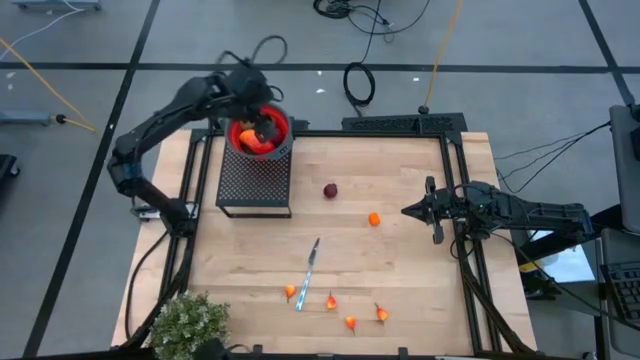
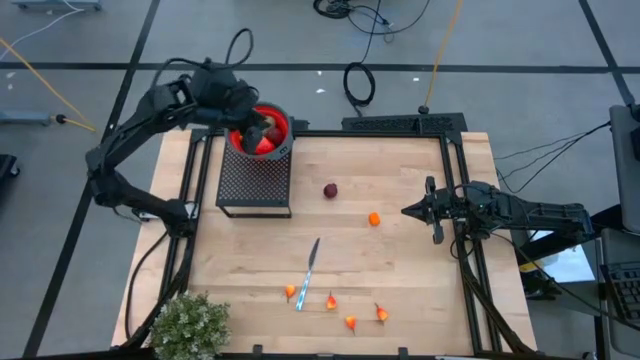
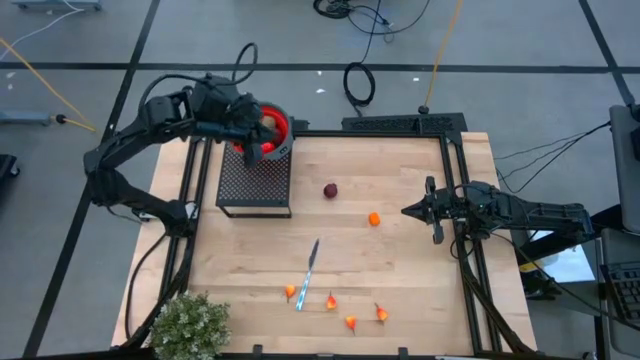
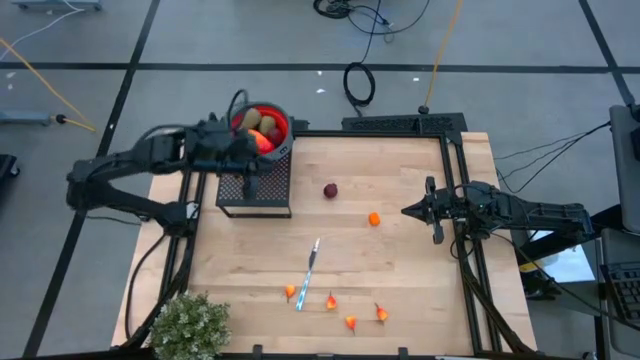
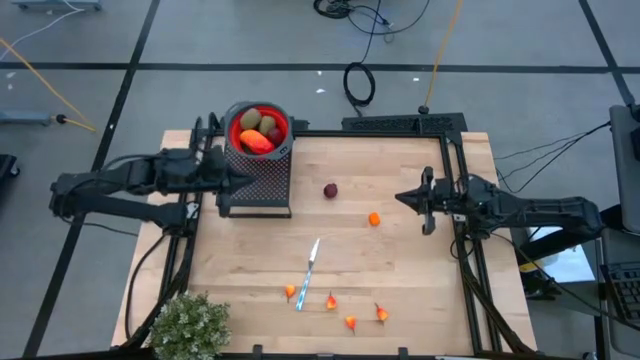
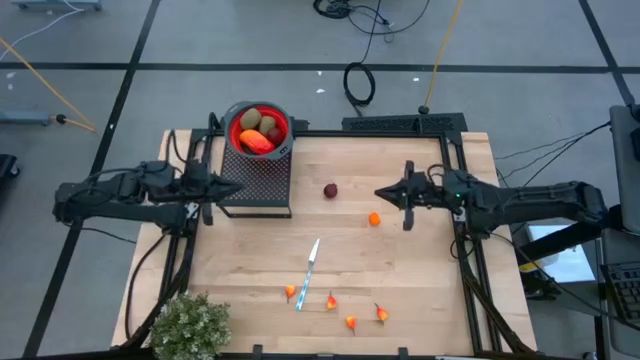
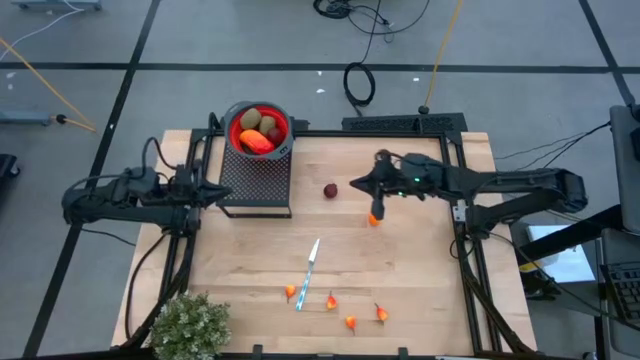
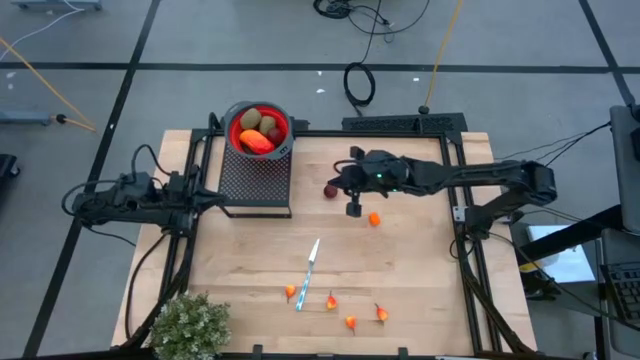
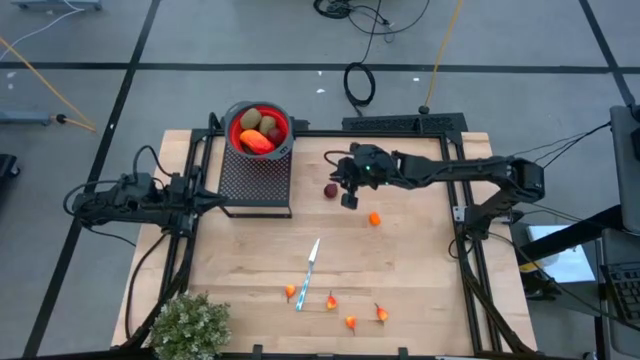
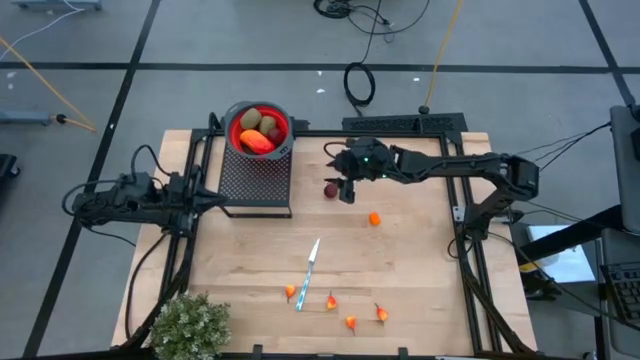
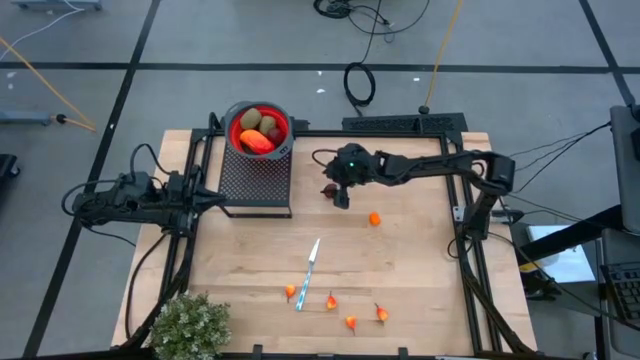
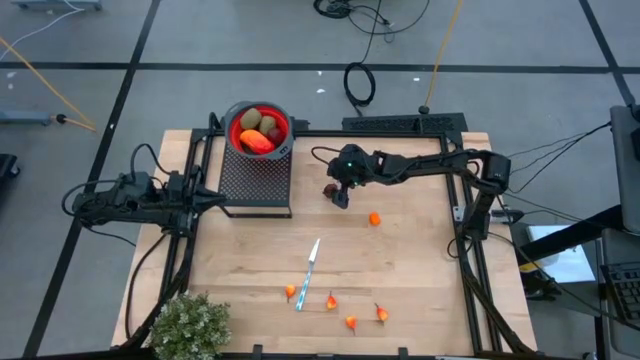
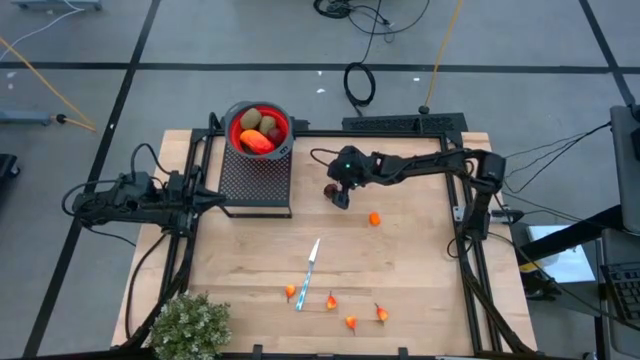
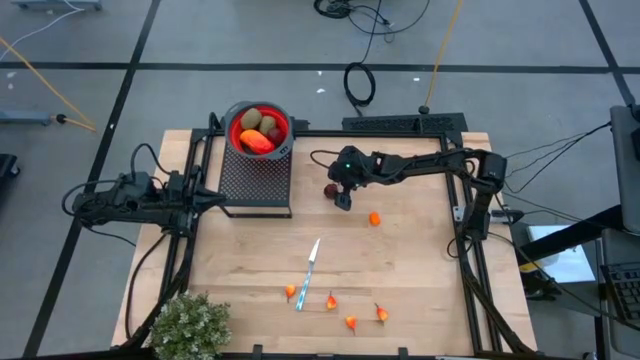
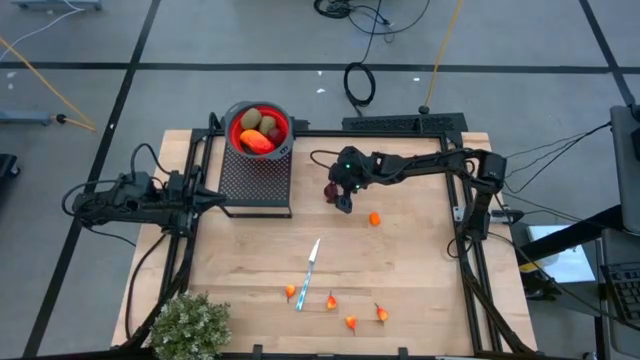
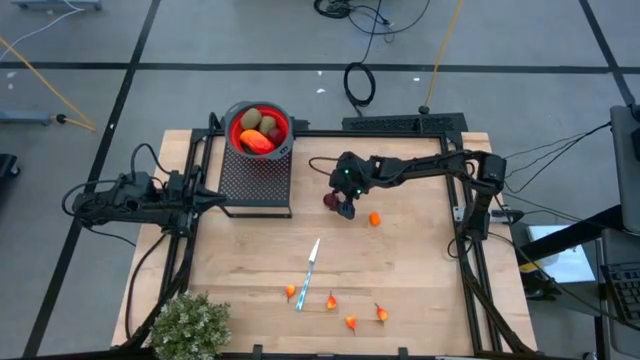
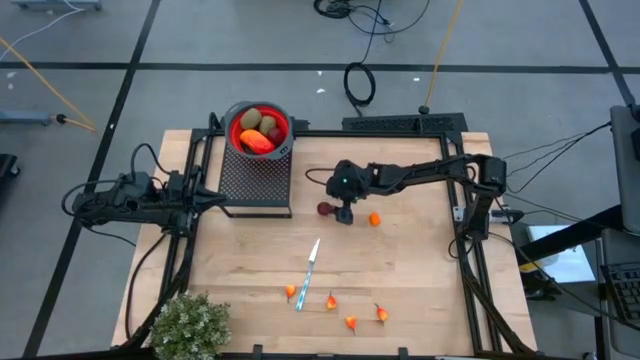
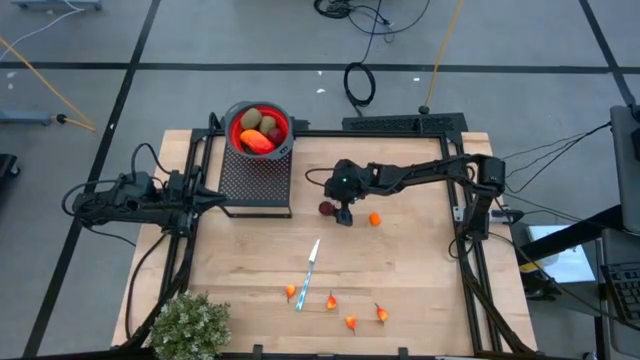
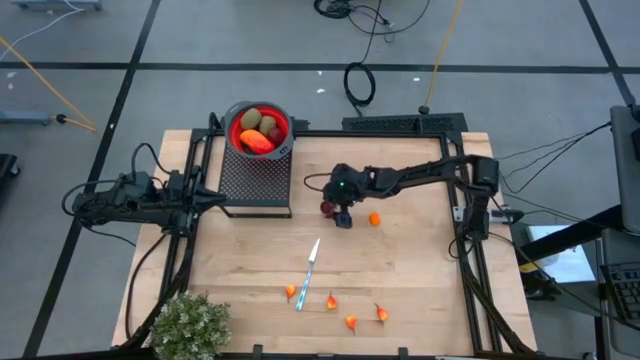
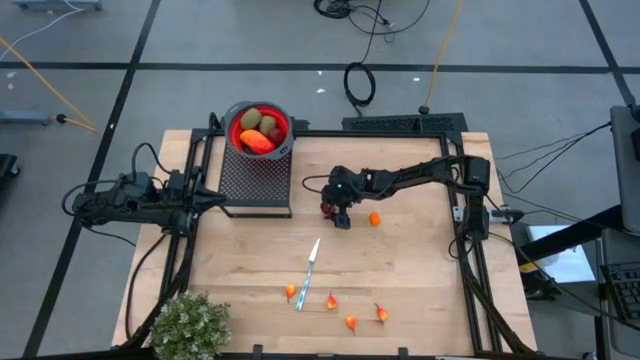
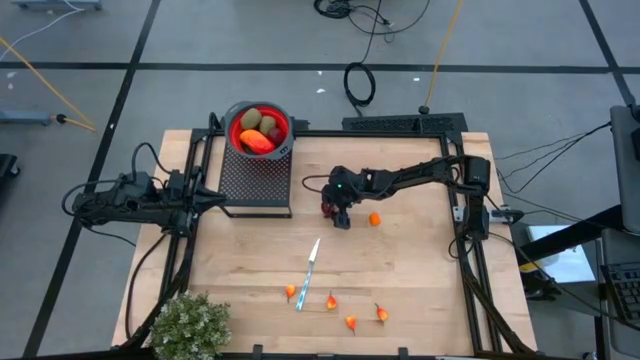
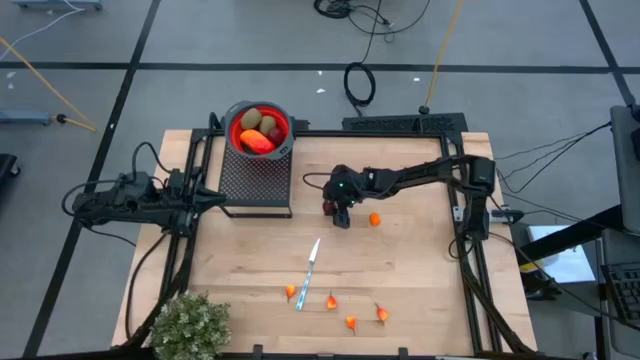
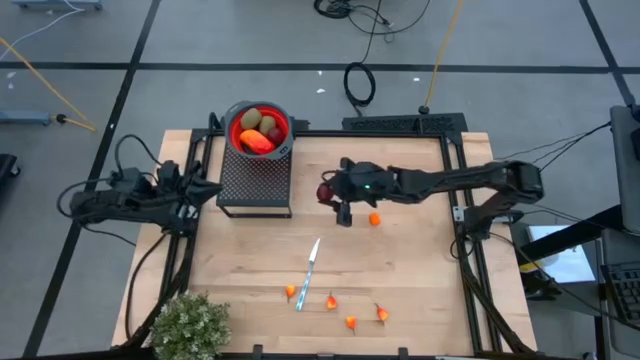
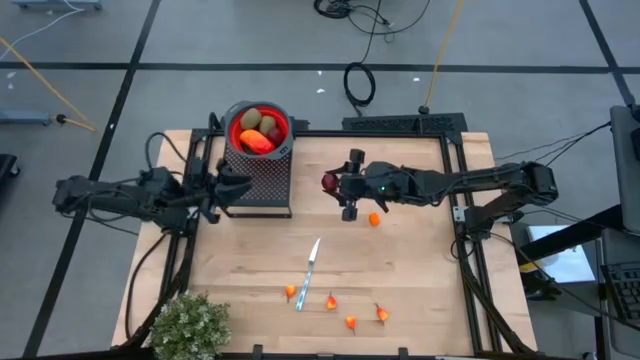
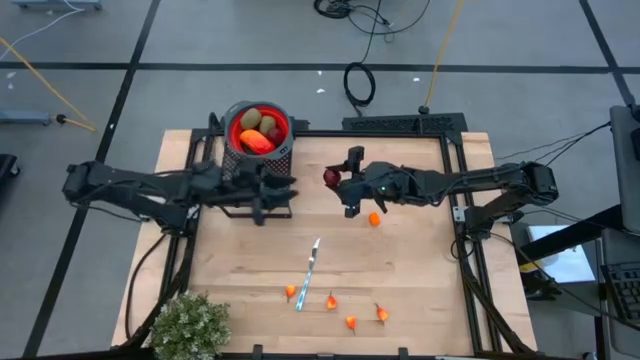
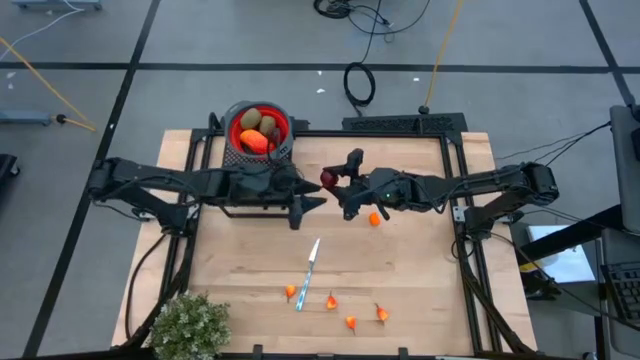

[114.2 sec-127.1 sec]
Task: Pick & Place Fruit
Put the red pomegranate into the red strainer bowl on the shelf

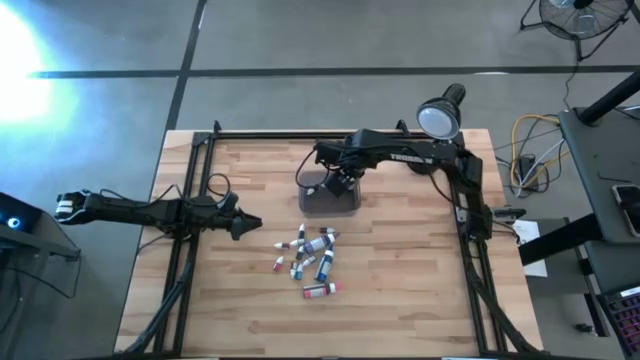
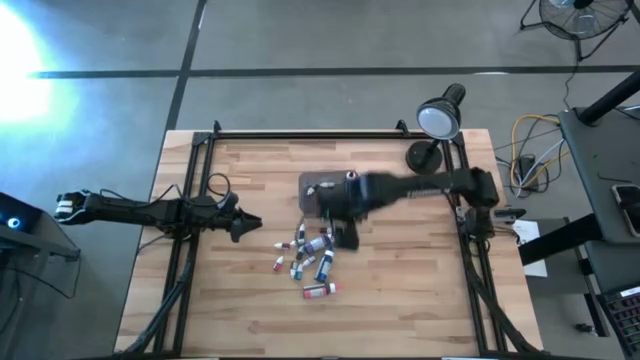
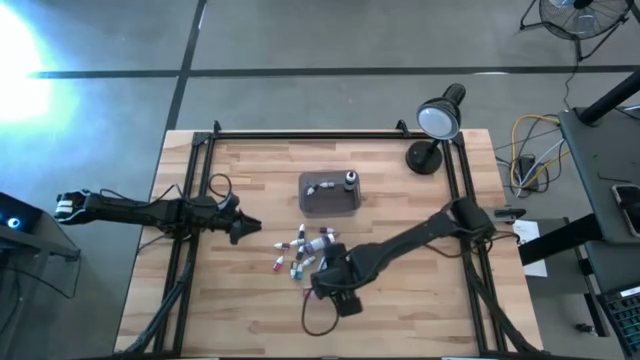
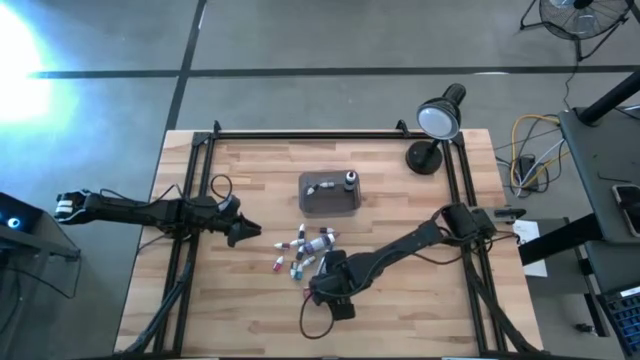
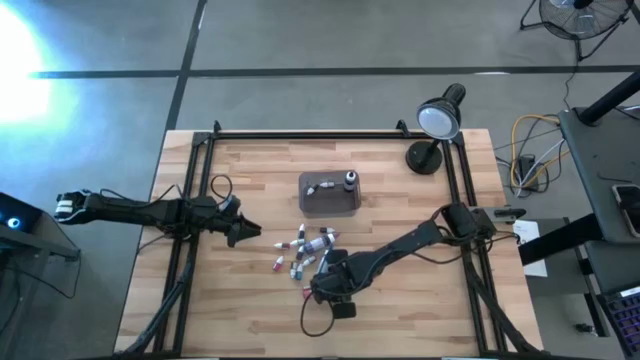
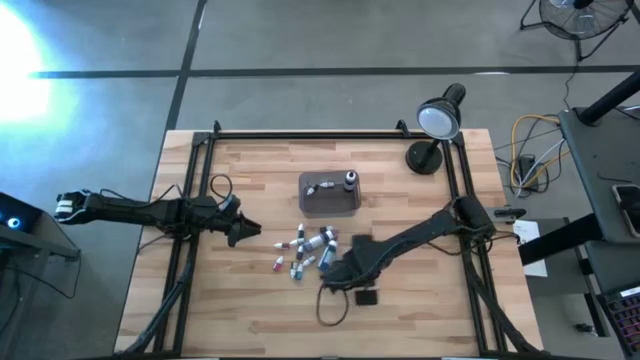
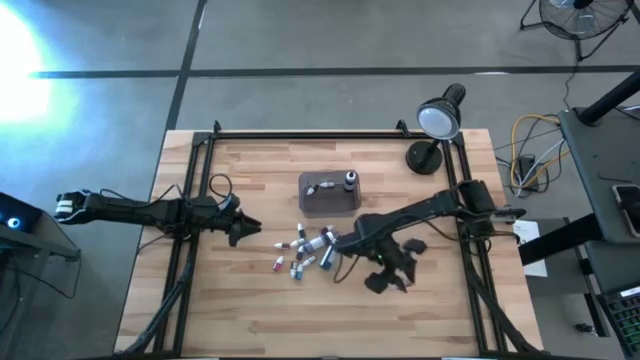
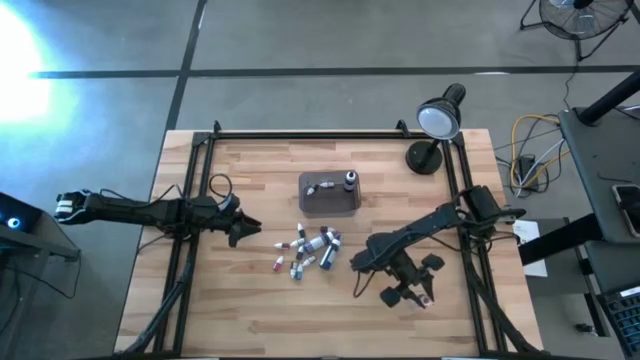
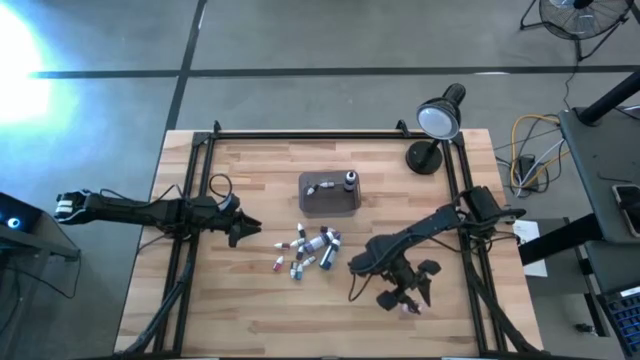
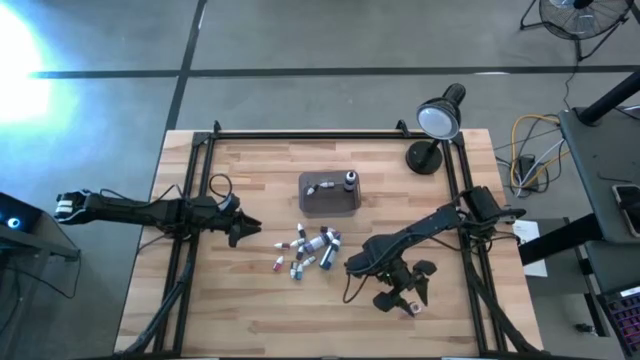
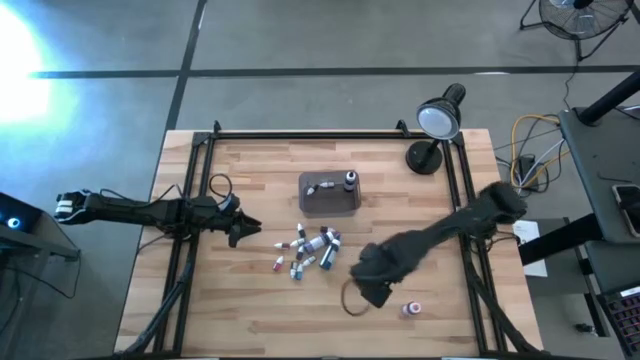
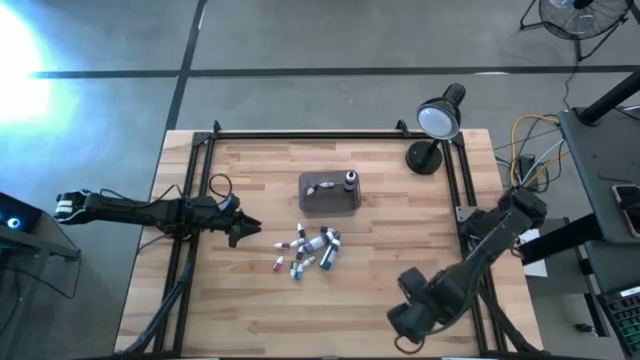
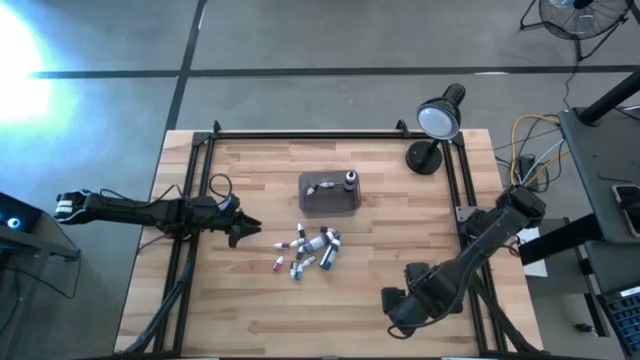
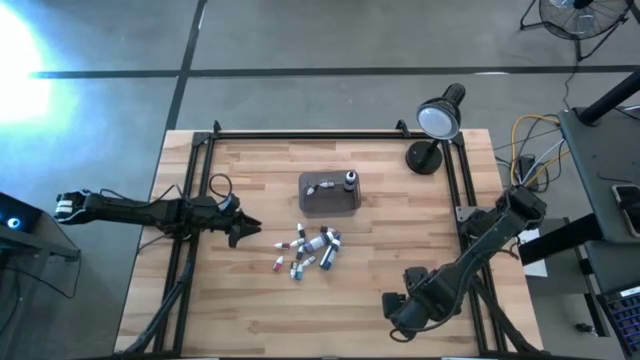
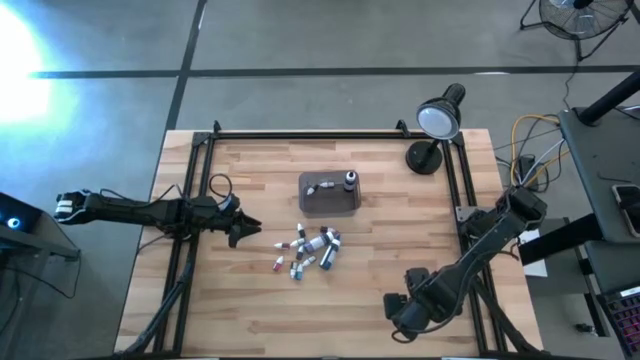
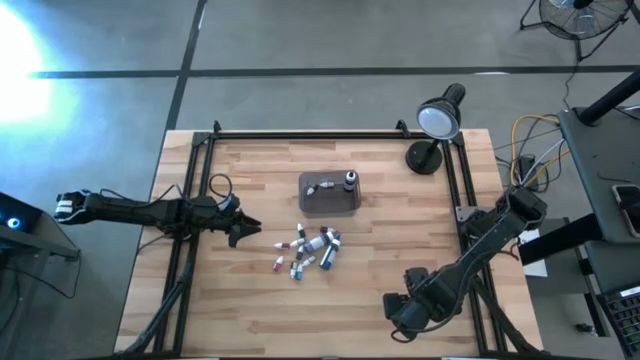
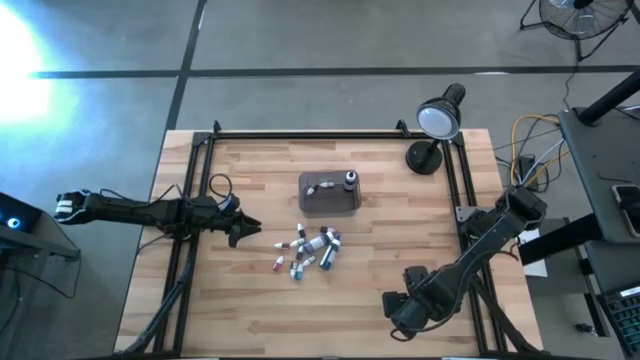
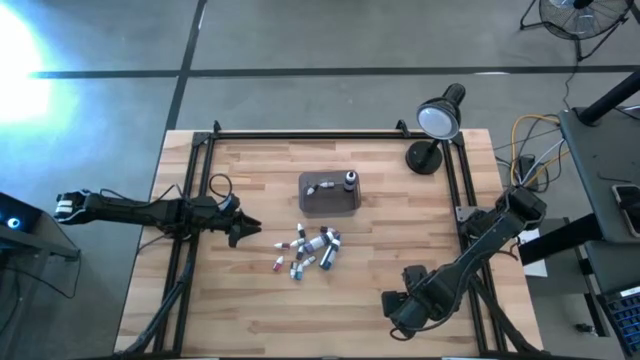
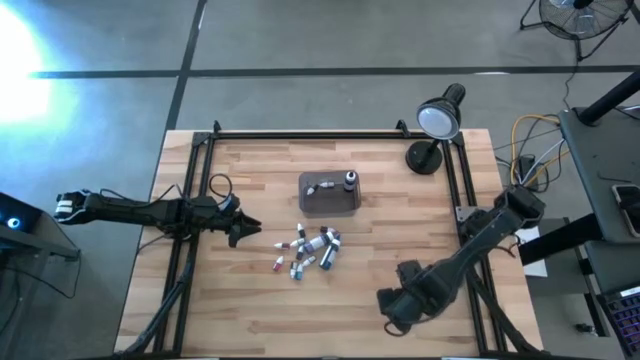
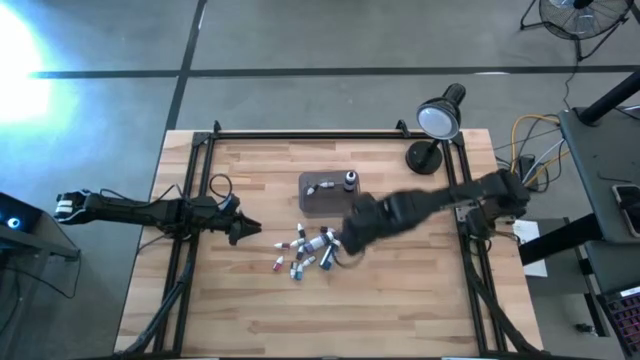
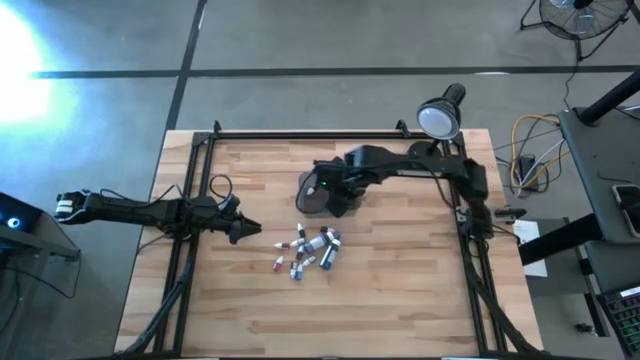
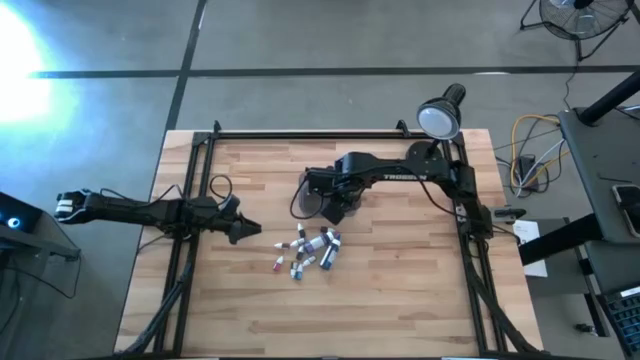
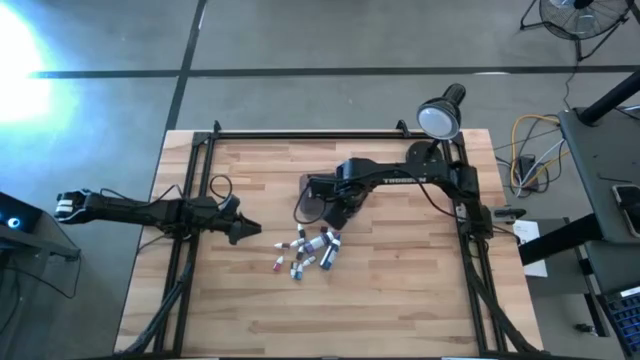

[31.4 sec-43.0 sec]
Task: Pick & Place food coloring
Put the large pink food coloring bottle into the bin
